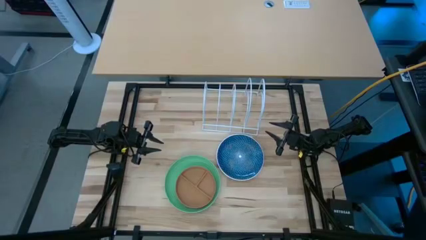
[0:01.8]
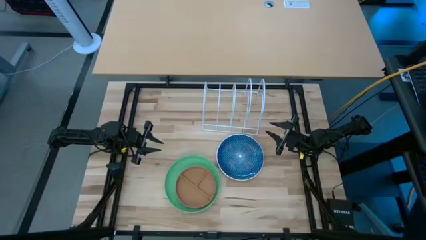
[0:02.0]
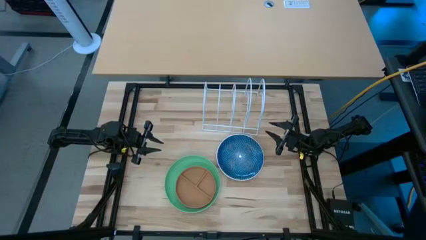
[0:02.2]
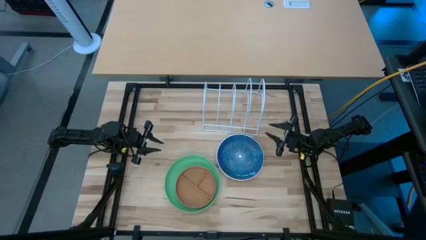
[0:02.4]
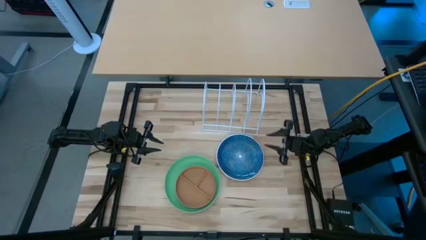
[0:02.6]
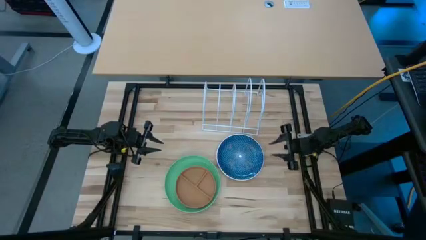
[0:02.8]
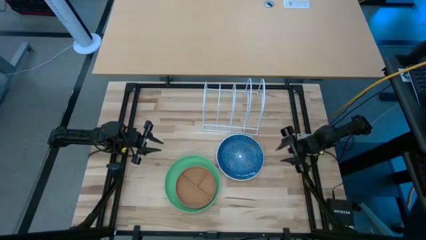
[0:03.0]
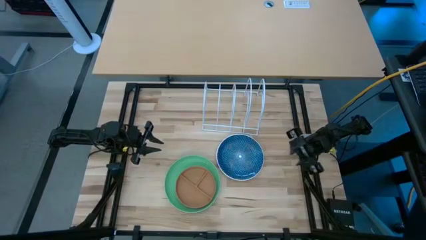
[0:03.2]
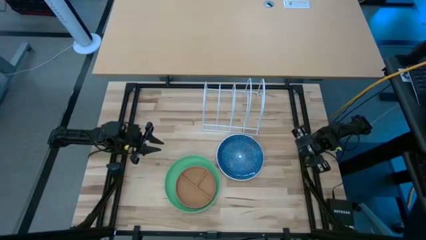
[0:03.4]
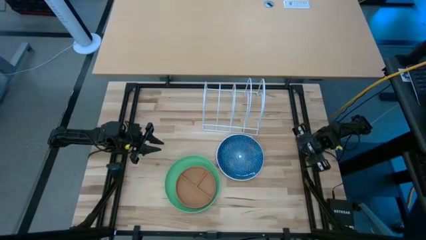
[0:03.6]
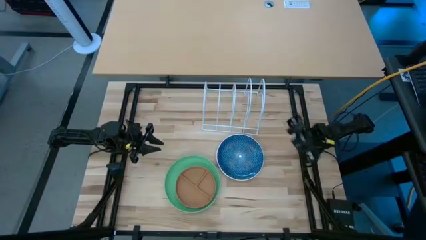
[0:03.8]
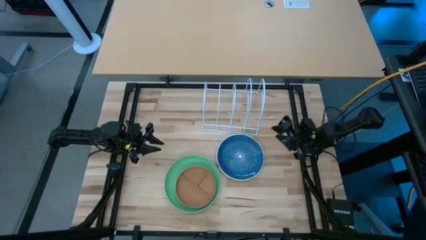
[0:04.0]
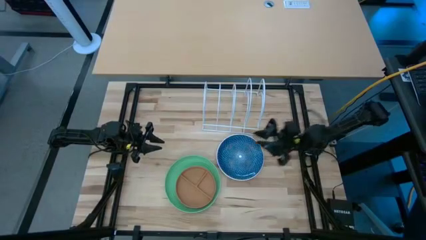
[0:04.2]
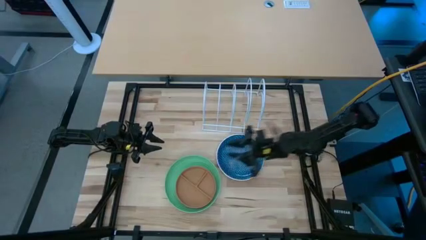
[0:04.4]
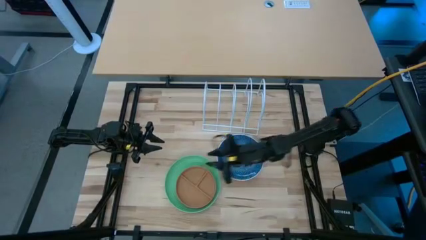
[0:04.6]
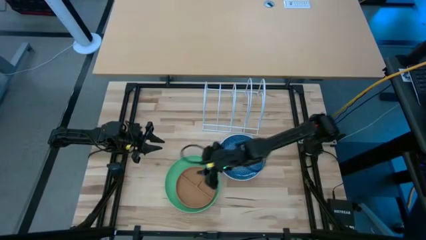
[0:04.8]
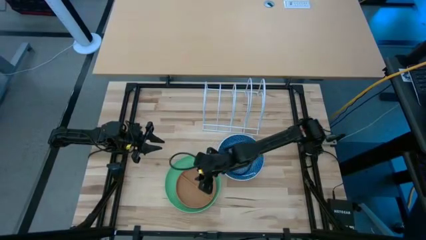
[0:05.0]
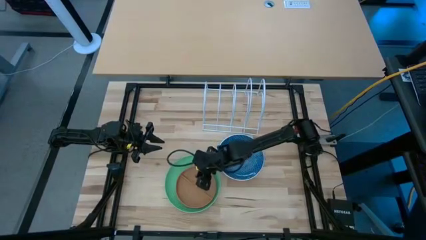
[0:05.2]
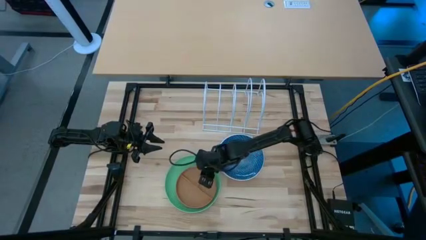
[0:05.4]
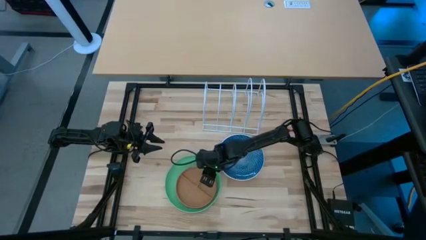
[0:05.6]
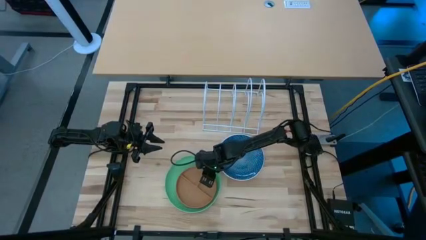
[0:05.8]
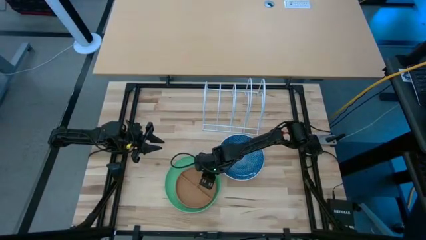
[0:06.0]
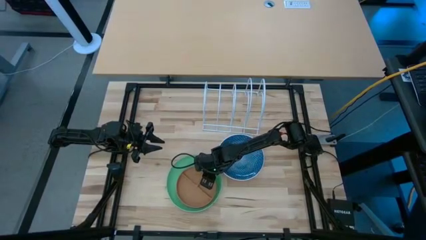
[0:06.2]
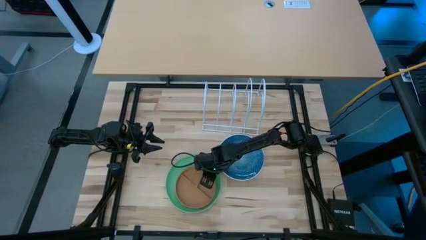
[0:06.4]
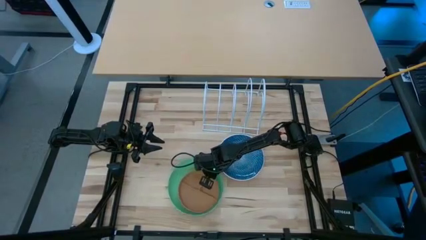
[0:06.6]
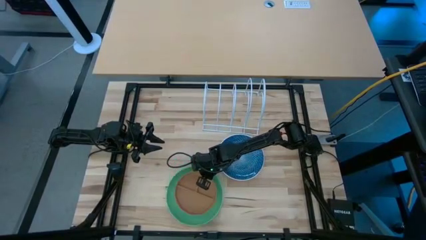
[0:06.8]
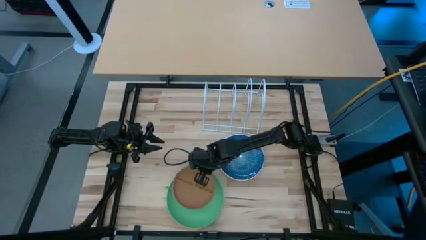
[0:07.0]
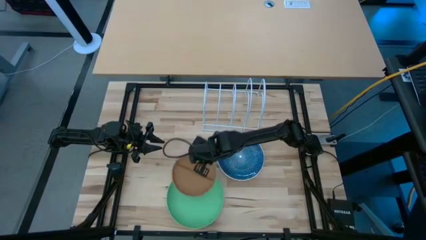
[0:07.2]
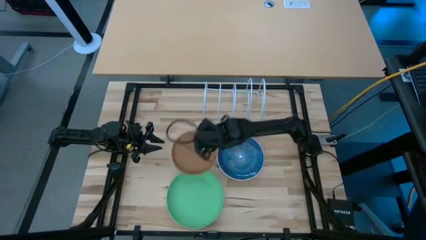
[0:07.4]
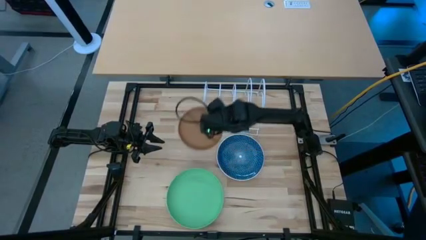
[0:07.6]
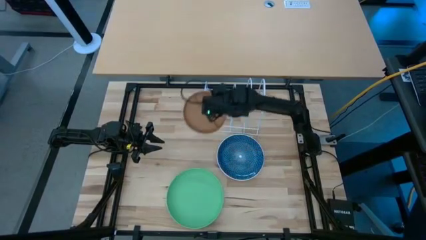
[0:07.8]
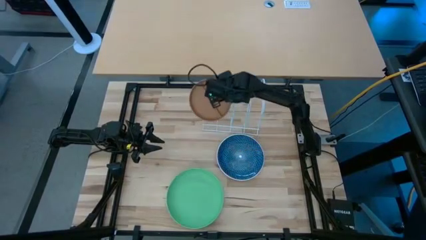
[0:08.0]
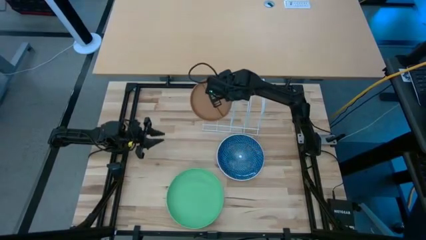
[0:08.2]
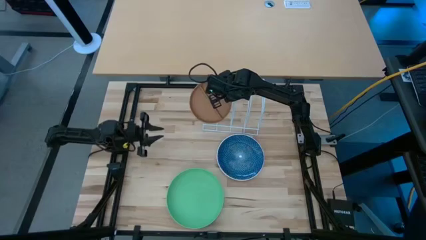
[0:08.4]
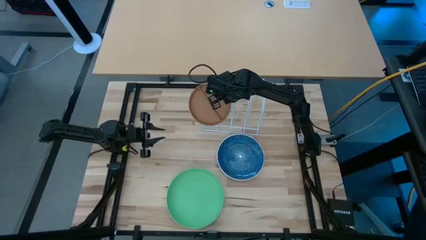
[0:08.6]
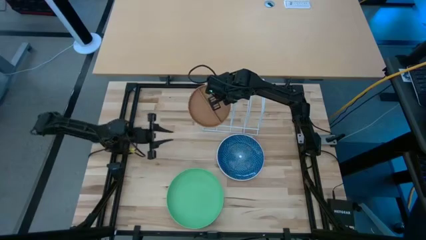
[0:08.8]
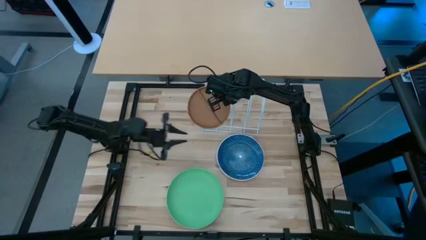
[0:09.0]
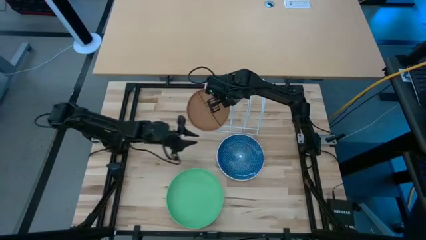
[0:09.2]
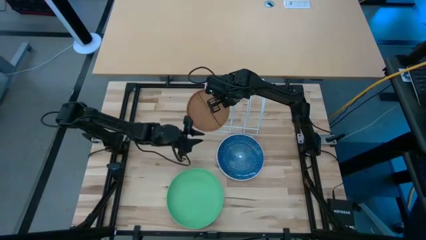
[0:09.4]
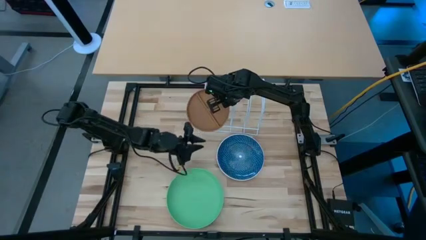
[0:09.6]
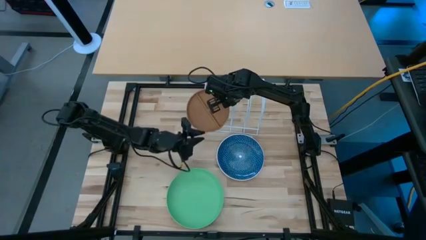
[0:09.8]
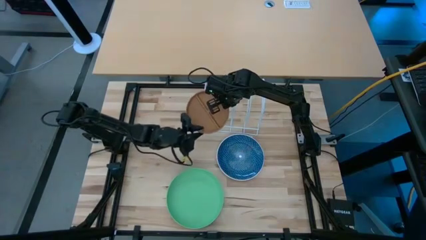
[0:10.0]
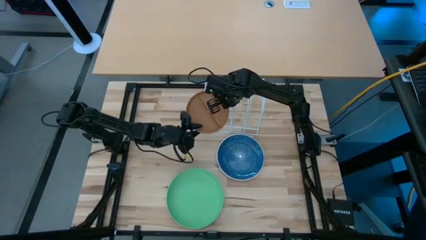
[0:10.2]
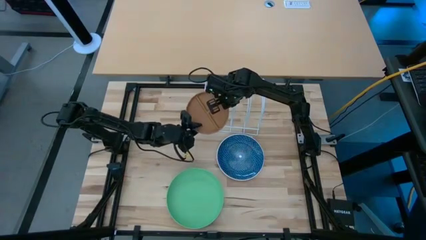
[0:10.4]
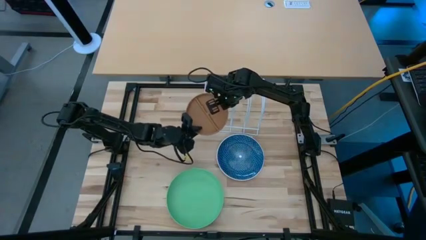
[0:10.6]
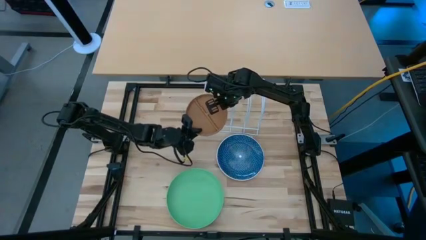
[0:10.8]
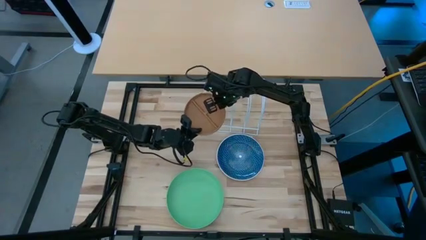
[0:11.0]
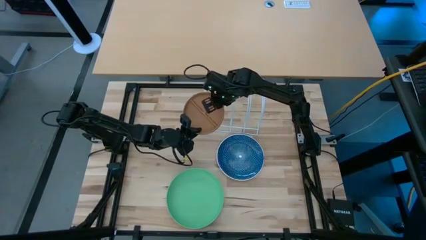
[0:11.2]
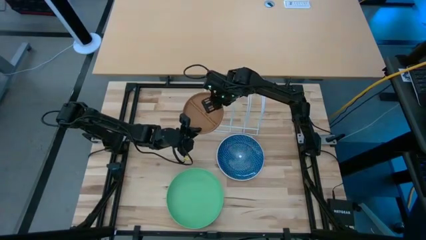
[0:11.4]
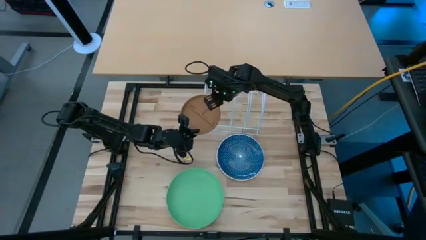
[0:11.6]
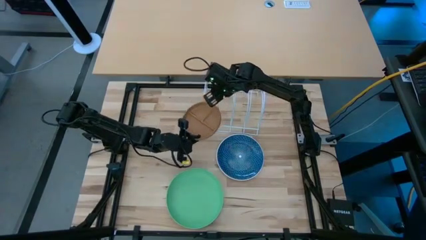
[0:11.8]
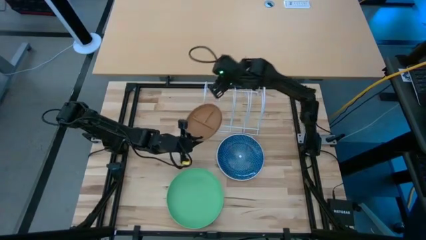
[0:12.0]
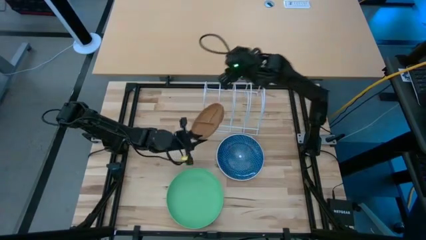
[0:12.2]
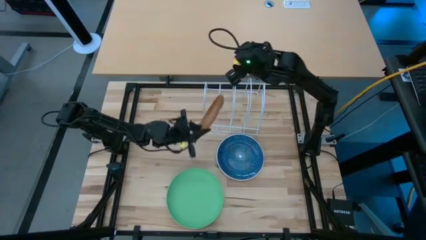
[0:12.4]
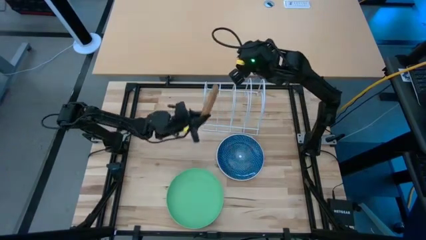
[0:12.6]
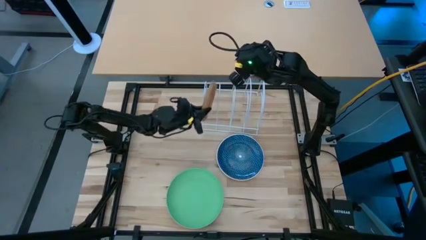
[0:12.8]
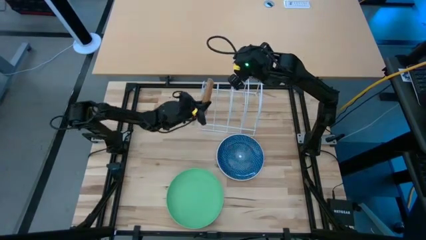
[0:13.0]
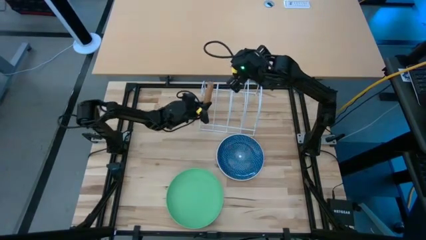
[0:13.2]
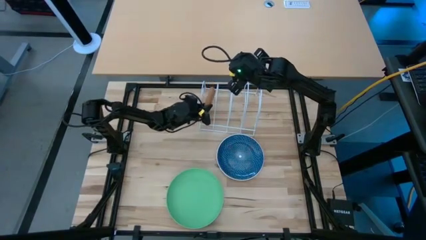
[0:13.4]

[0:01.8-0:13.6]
Task: Sort dishes
Put the brown plate in the dish rack

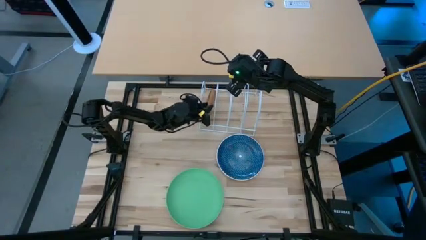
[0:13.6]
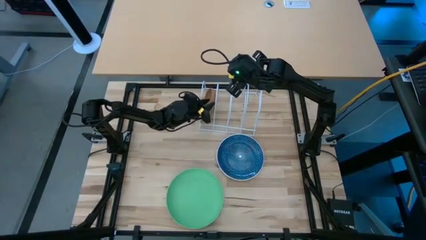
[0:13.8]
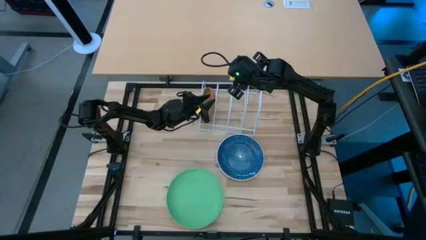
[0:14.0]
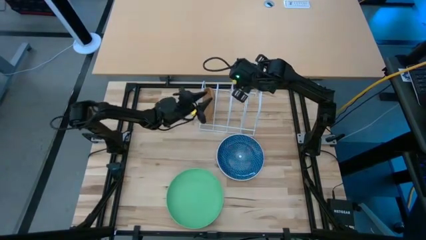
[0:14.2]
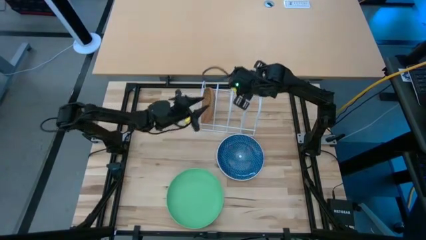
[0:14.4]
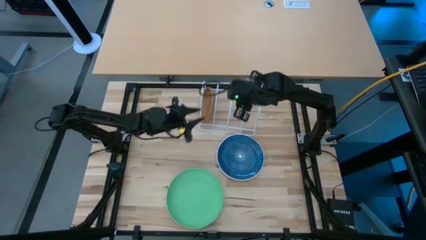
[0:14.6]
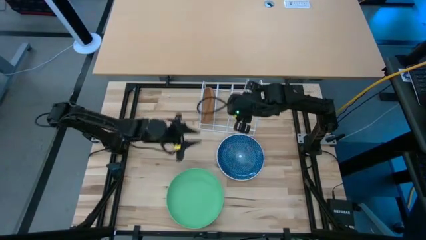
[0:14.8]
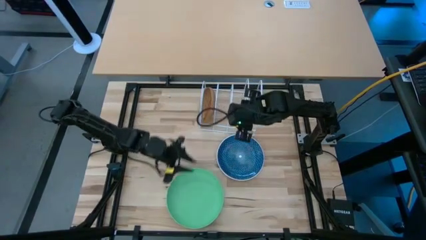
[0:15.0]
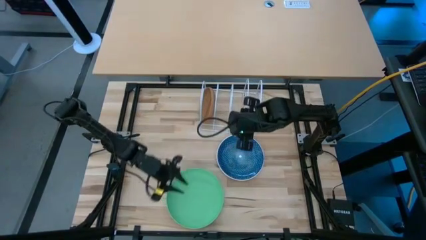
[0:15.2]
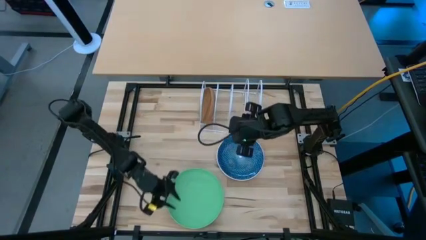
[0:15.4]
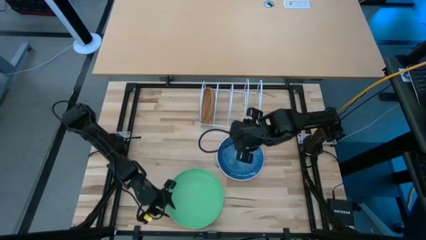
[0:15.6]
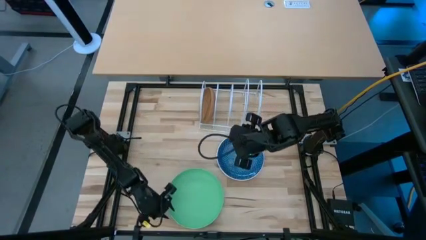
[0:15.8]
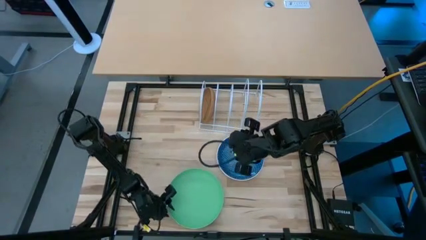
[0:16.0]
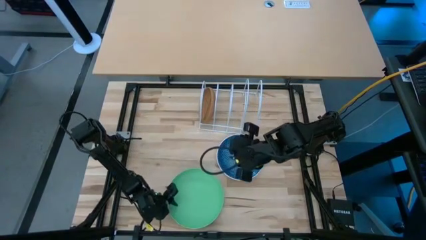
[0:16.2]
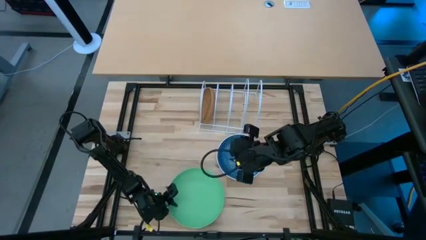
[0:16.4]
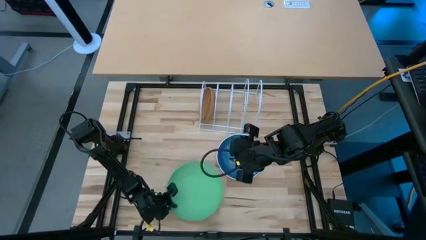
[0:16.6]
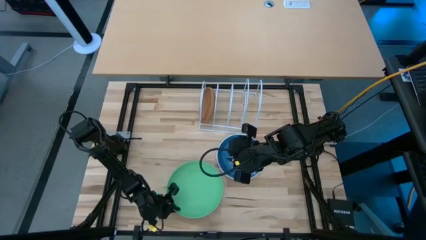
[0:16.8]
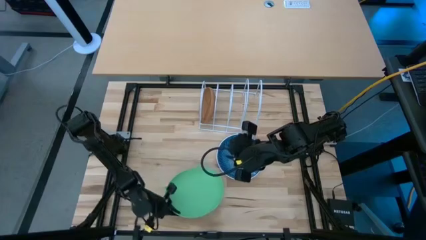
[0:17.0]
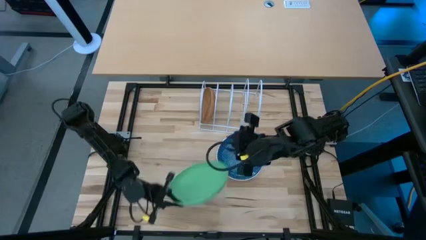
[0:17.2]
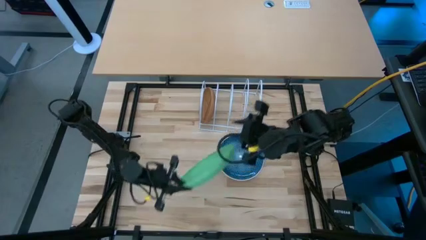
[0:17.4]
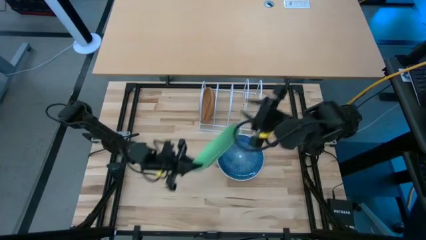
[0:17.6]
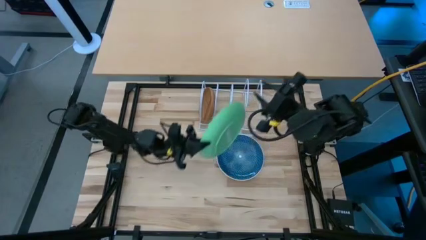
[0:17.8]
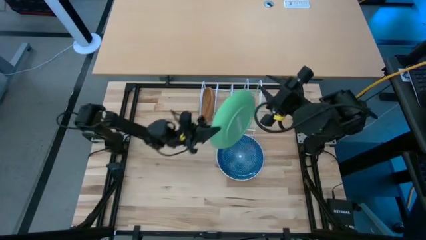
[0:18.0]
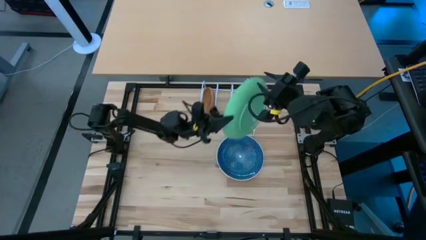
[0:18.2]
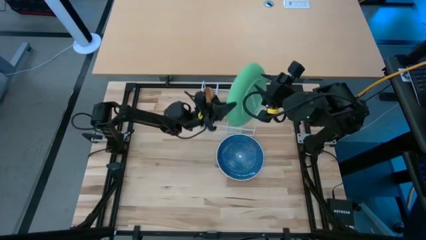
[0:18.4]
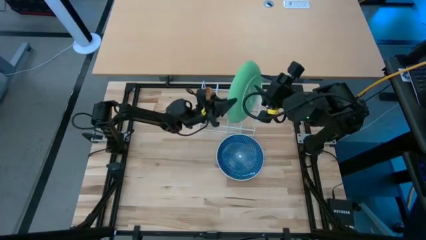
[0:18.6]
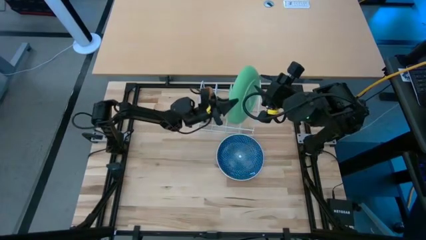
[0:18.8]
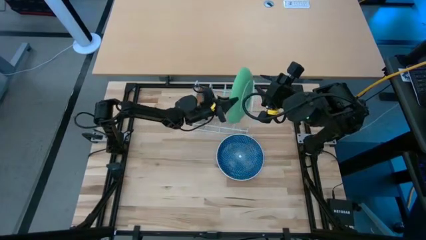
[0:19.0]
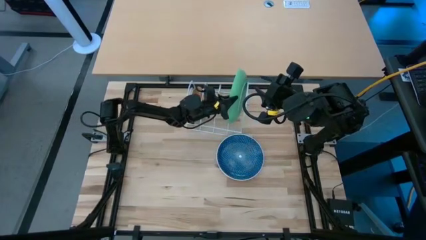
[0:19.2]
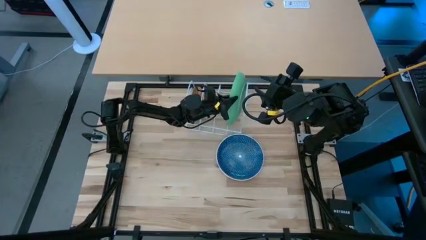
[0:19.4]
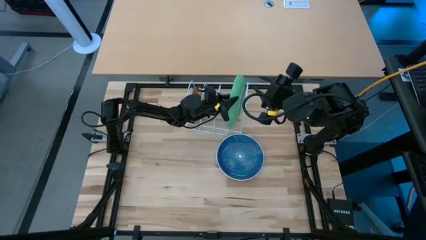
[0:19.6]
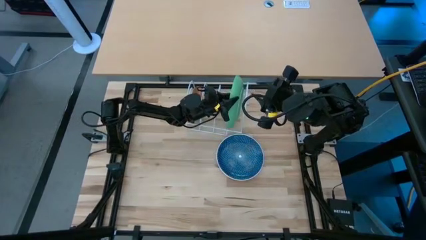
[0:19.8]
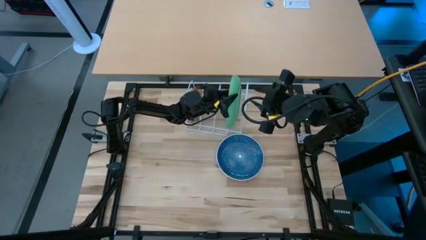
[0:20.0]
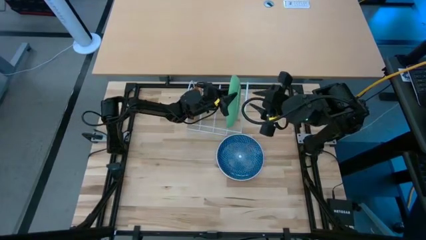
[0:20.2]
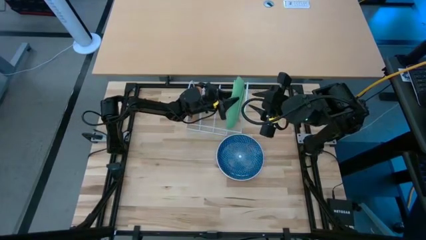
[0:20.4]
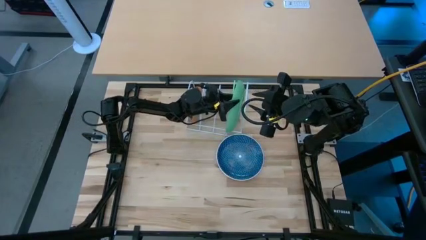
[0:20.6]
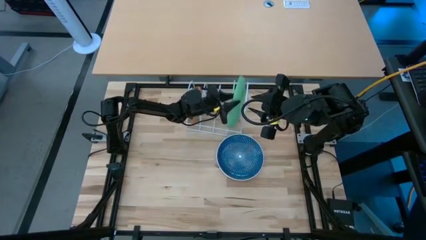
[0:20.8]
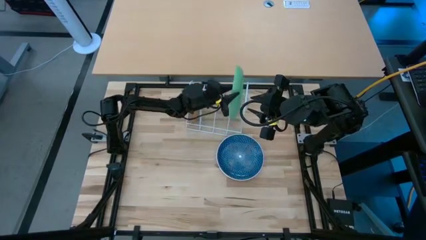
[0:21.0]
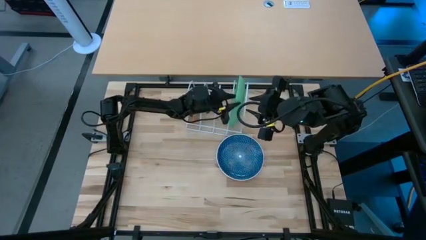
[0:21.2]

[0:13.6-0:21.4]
Put the green plate in the dish rack
